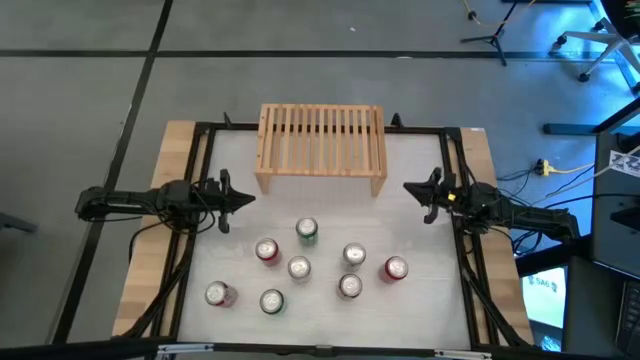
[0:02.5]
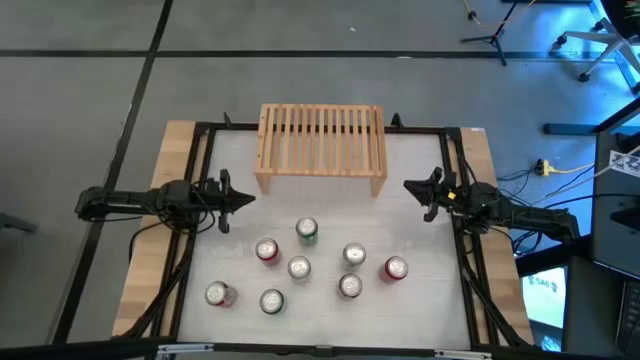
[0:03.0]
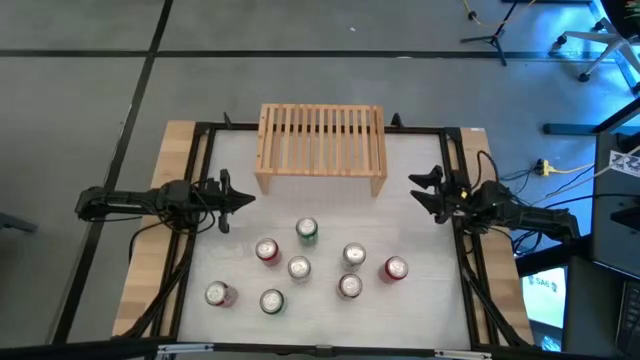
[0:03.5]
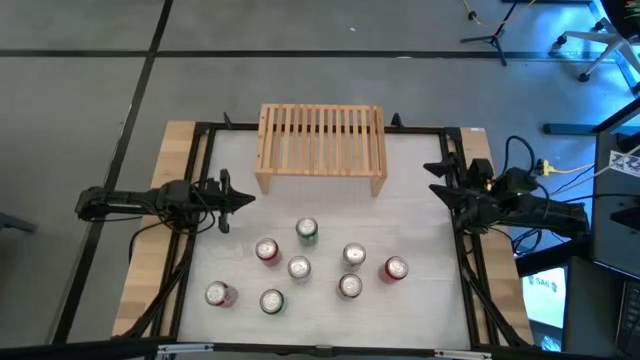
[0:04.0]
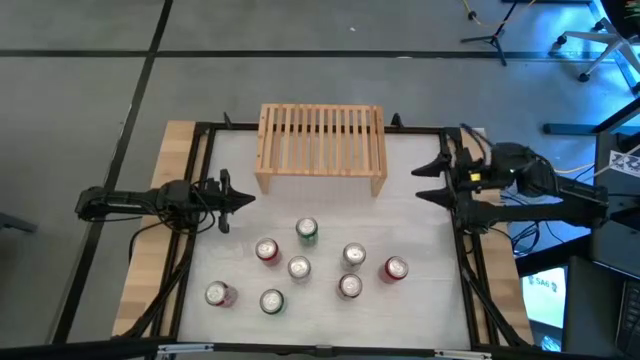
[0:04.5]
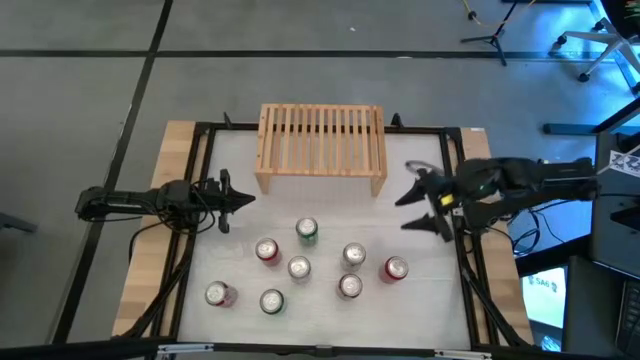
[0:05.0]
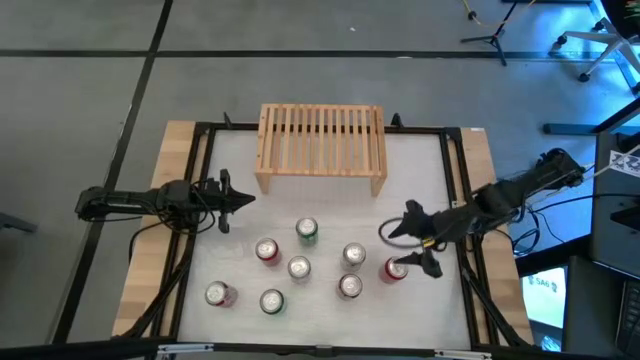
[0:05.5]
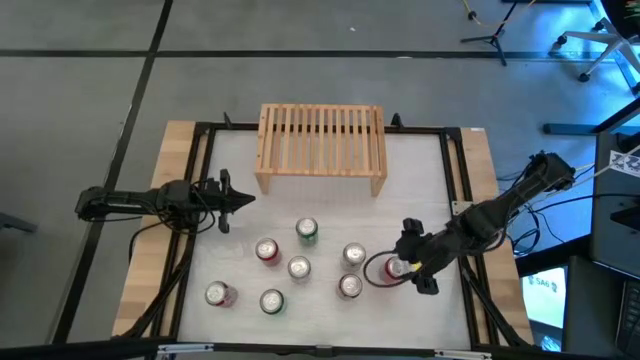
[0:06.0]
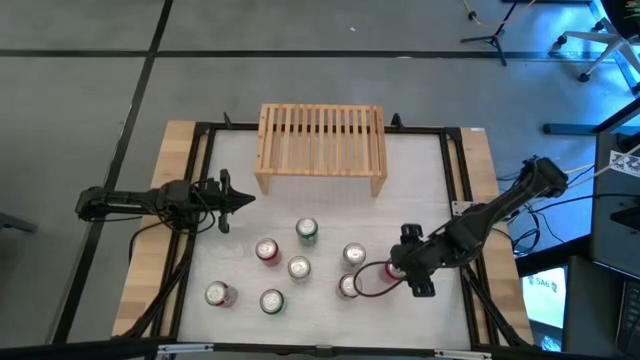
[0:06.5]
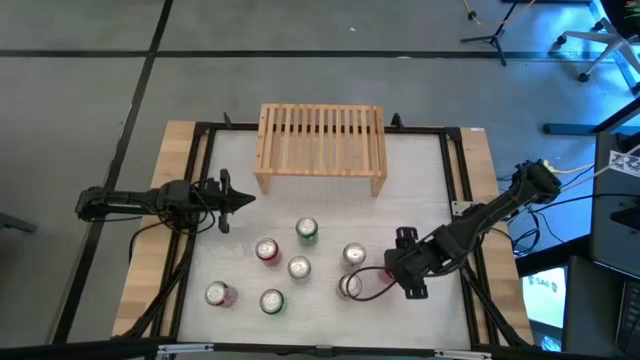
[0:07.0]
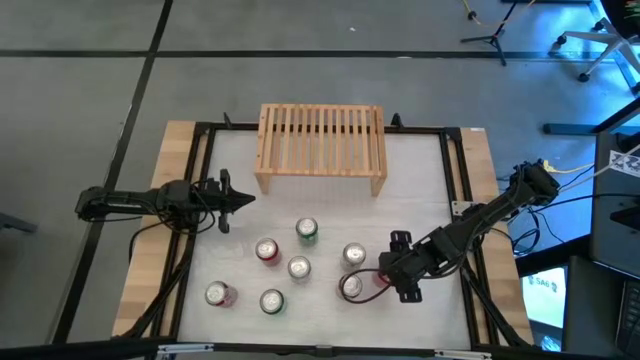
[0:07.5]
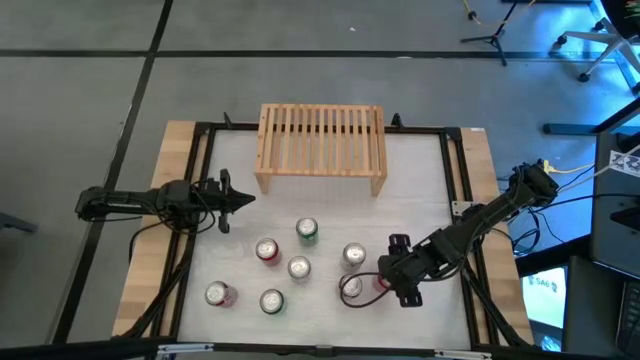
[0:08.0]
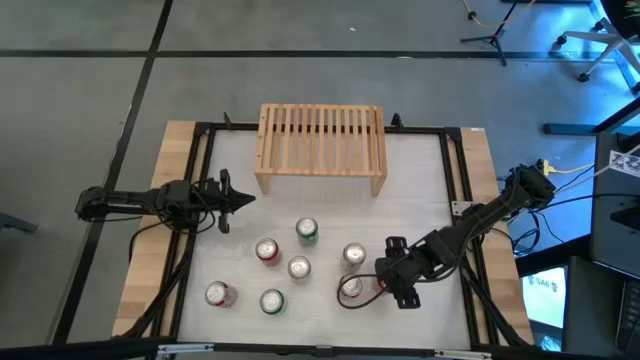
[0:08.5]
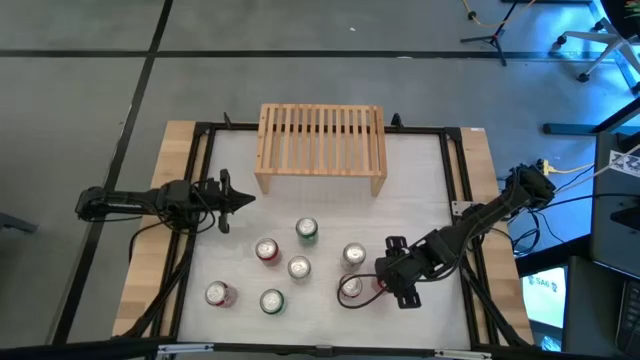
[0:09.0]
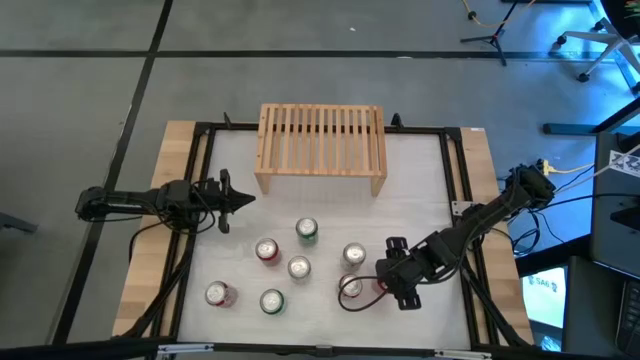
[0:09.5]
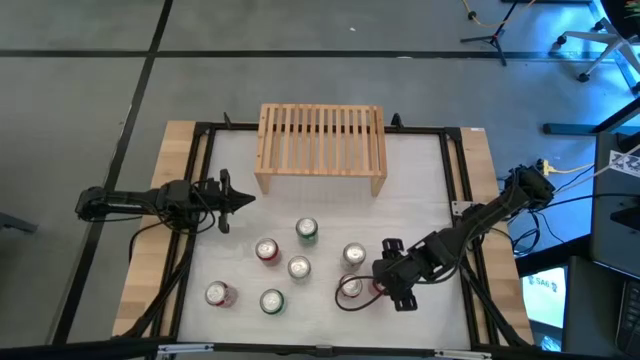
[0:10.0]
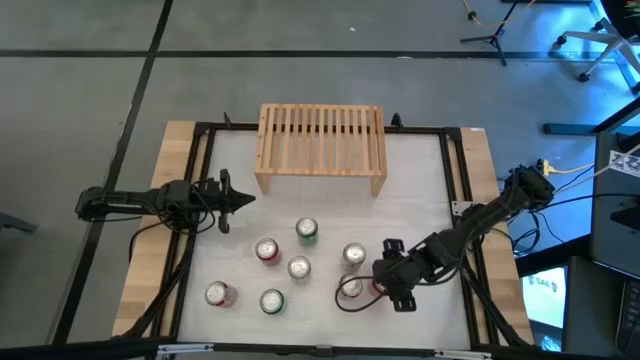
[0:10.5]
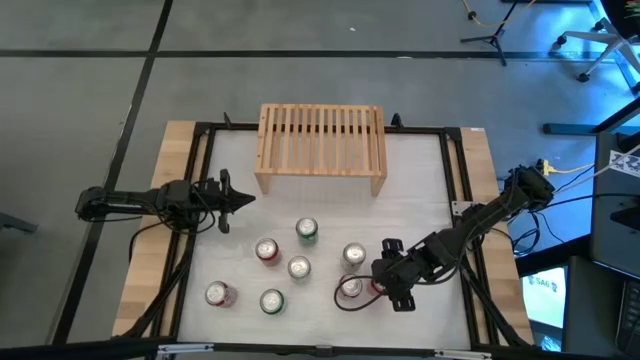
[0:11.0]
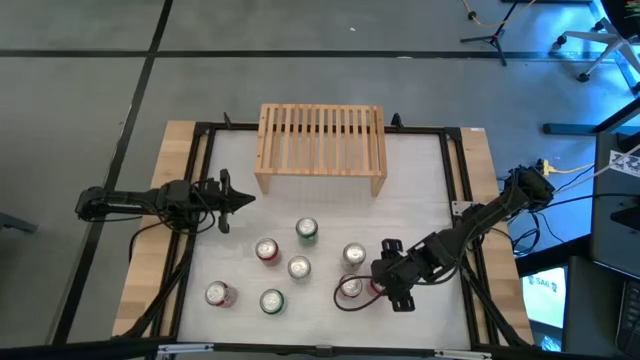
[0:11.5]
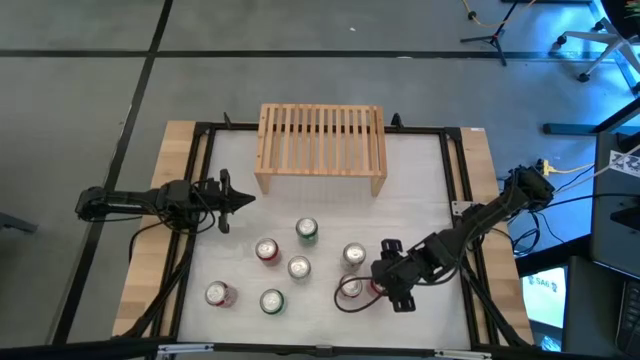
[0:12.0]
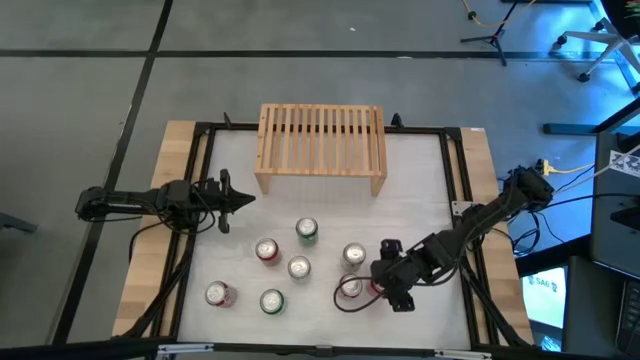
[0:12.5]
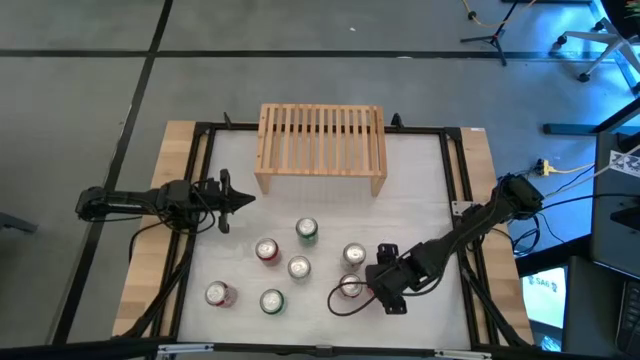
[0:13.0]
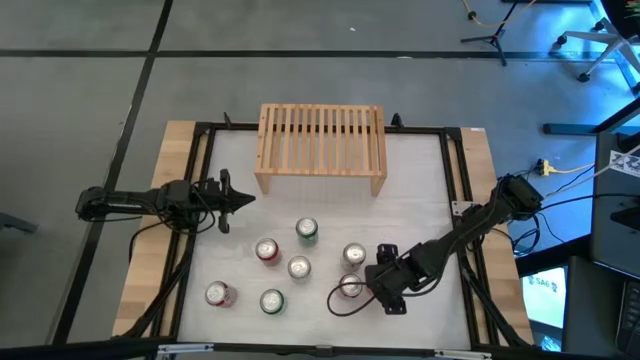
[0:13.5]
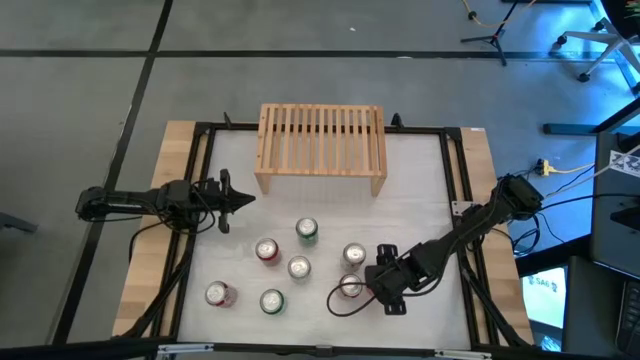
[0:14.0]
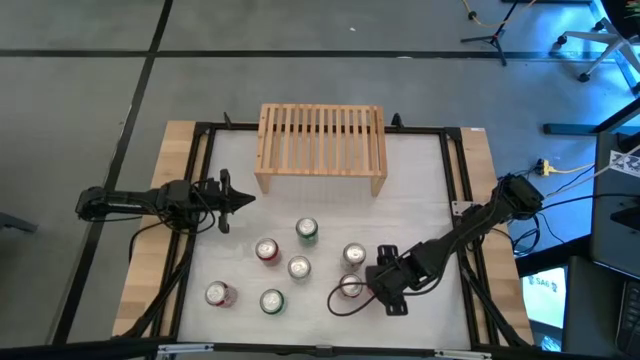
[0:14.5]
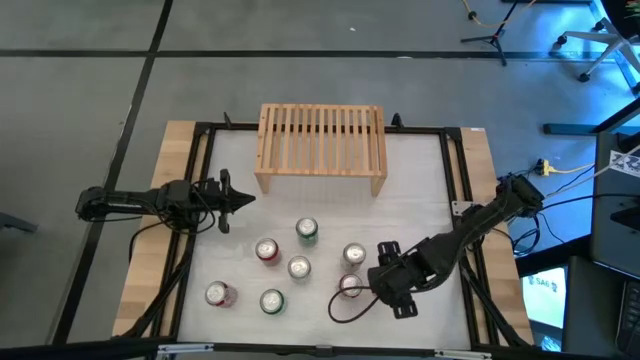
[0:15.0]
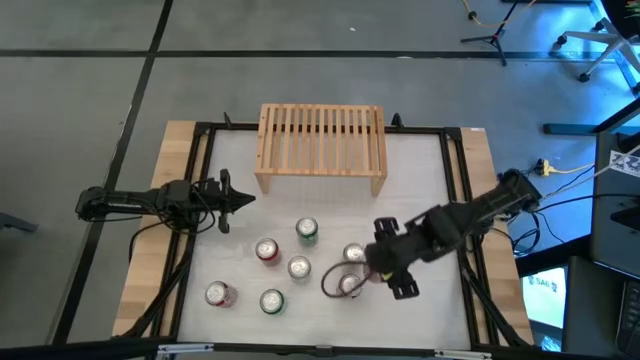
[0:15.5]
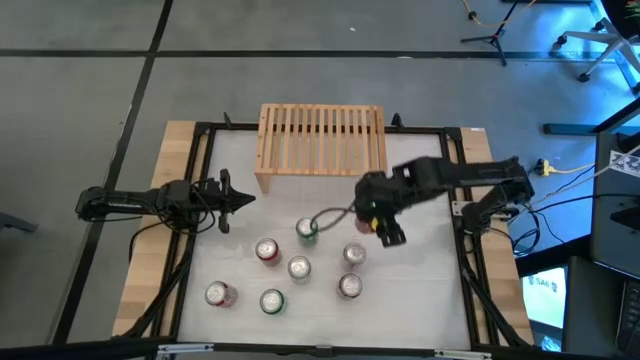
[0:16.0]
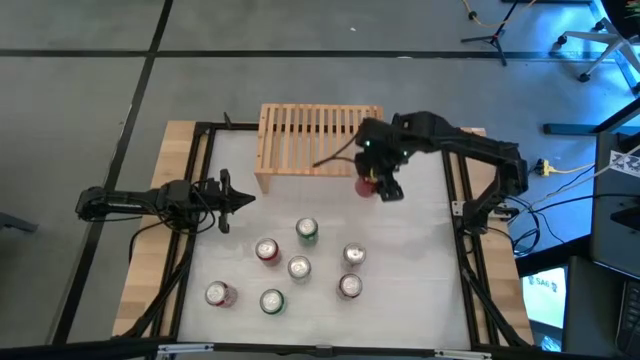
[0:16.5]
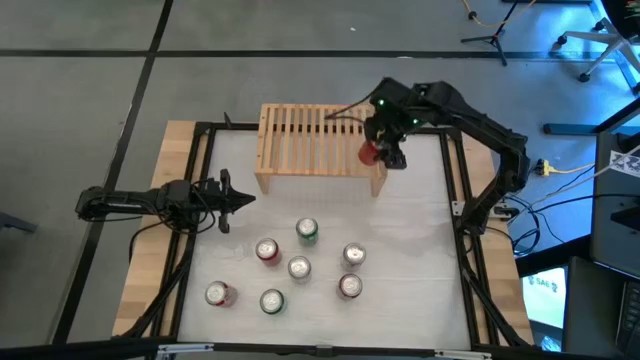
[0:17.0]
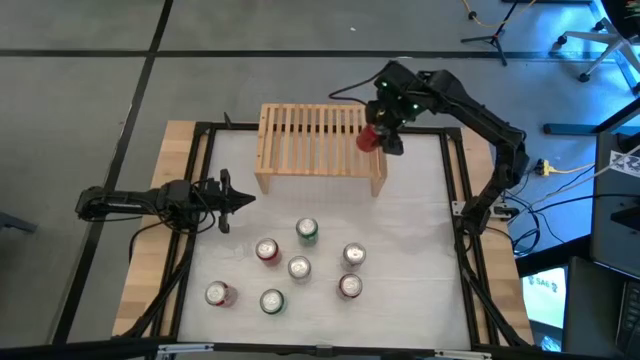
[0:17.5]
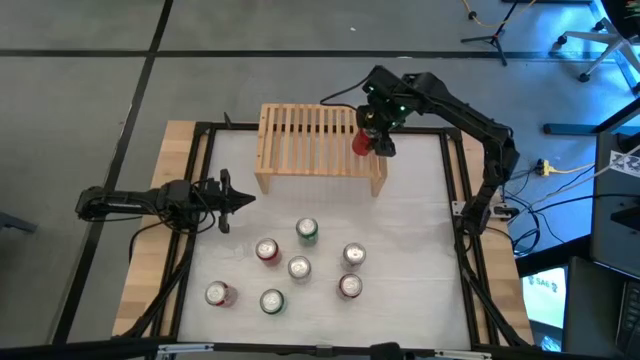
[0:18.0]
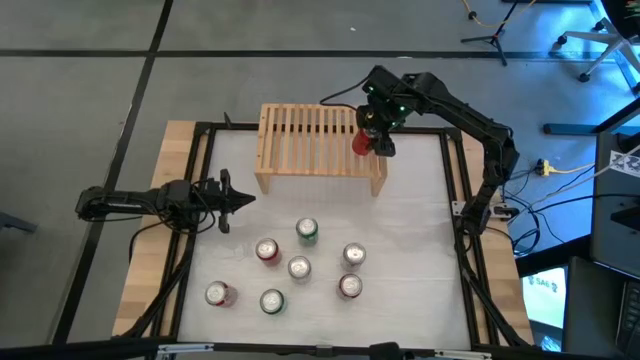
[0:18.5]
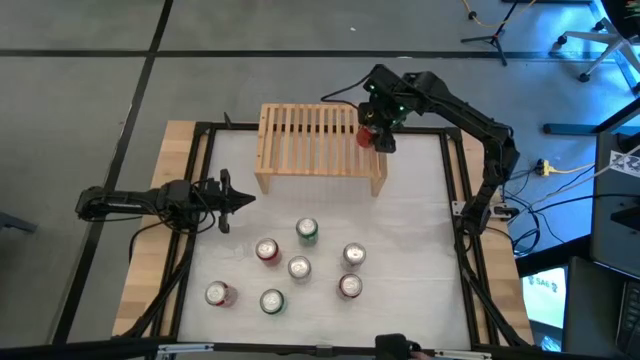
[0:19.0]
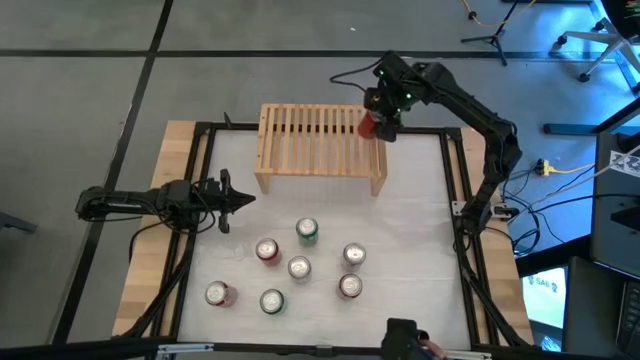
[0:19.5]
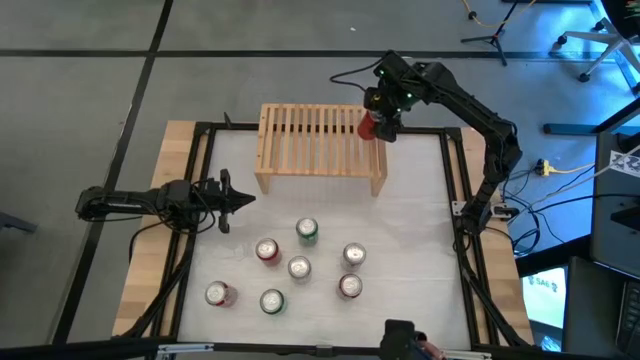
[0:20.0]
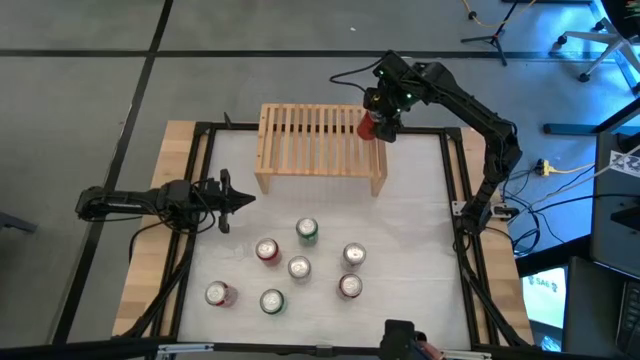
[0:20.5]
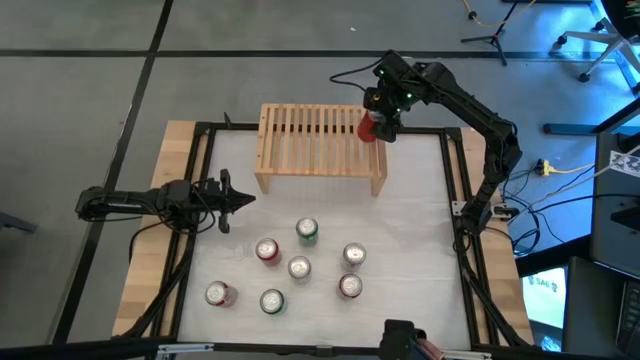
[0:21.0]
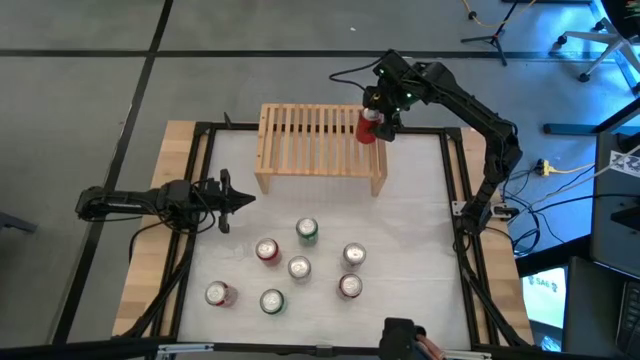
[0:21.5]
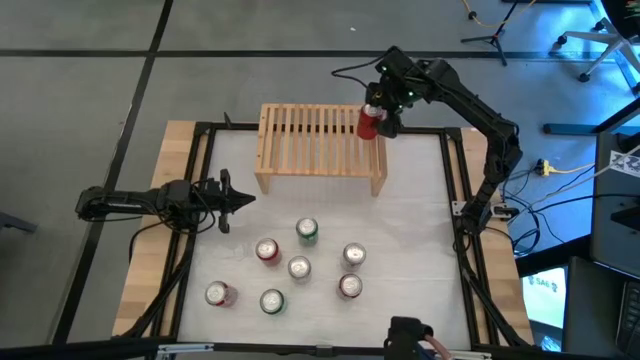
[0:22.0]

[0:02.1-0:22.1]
Task: Place canned beverage on shelf
Put the right red black soda can on the shelf
